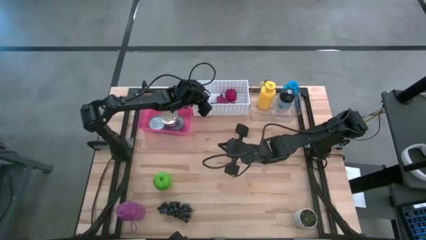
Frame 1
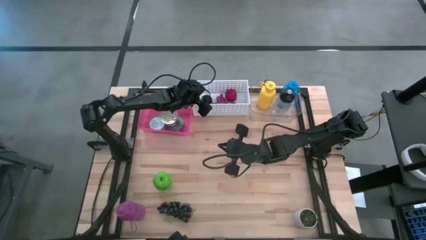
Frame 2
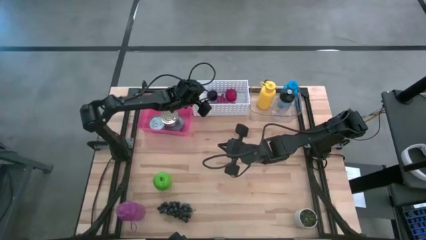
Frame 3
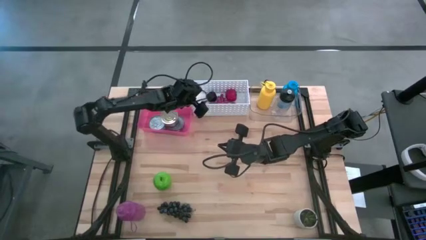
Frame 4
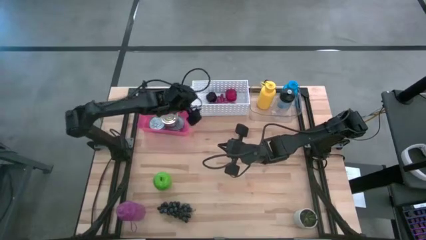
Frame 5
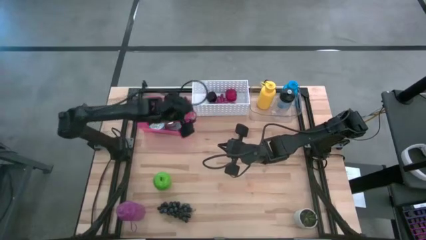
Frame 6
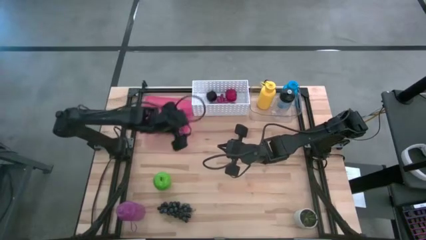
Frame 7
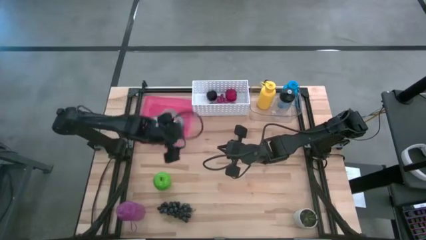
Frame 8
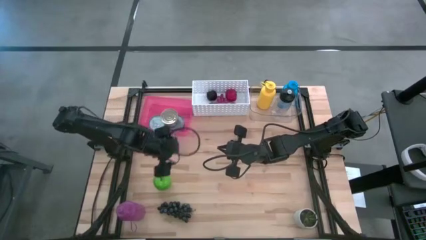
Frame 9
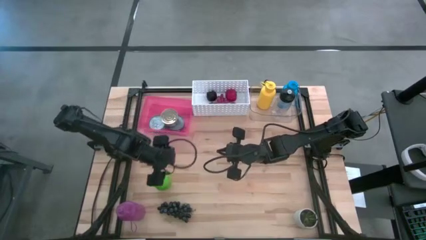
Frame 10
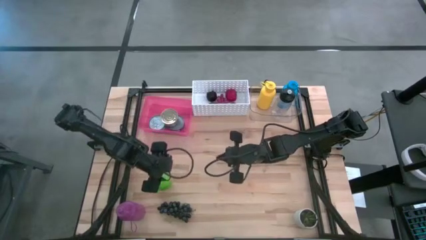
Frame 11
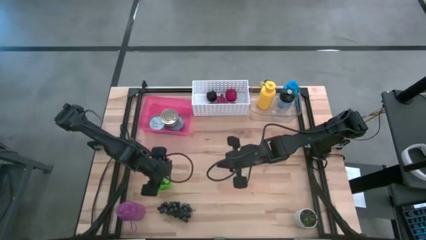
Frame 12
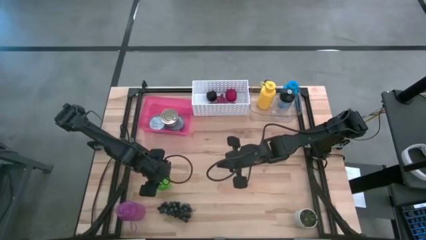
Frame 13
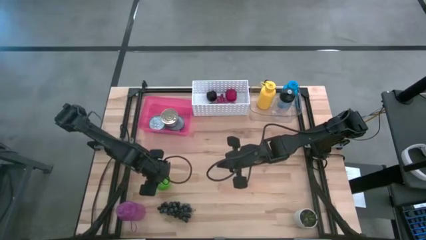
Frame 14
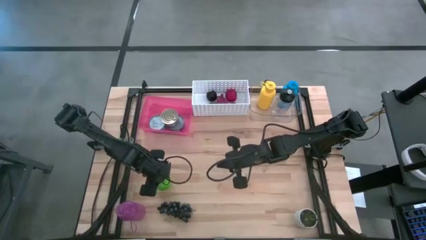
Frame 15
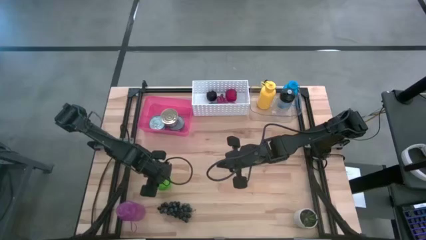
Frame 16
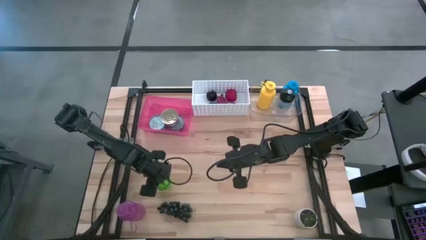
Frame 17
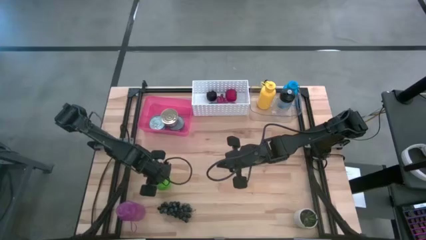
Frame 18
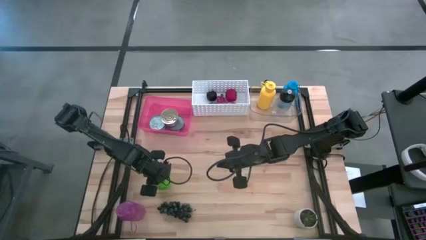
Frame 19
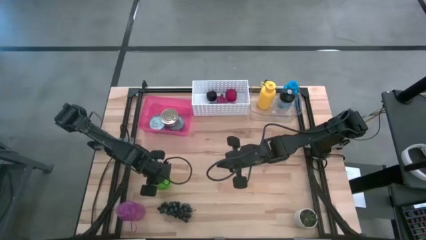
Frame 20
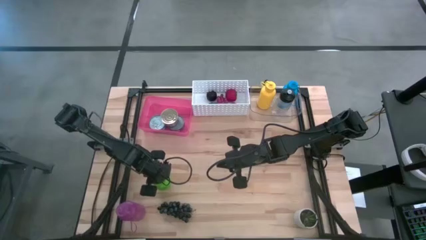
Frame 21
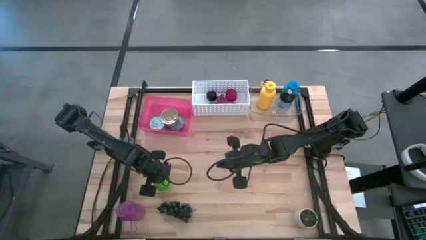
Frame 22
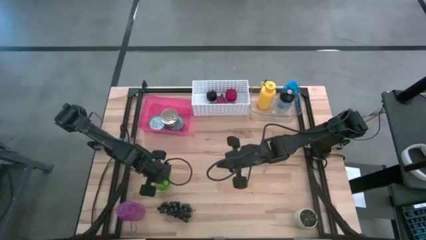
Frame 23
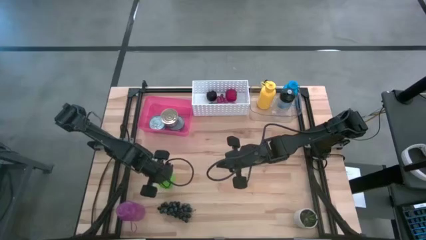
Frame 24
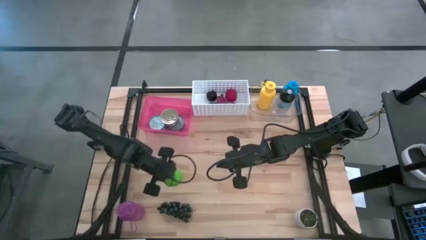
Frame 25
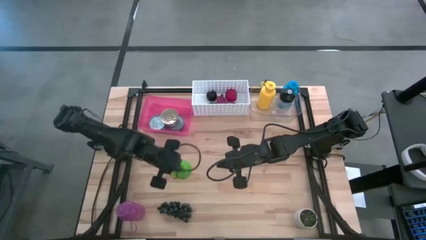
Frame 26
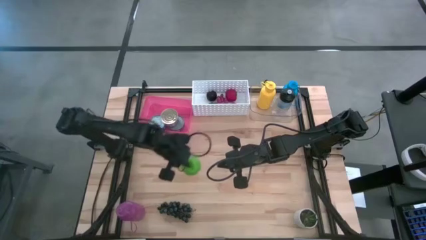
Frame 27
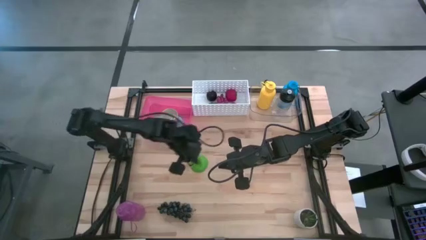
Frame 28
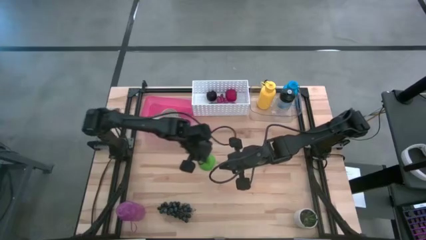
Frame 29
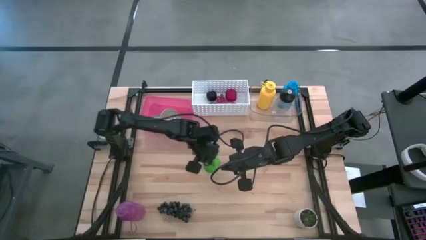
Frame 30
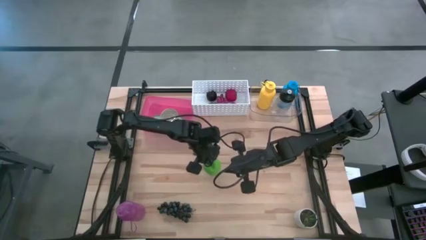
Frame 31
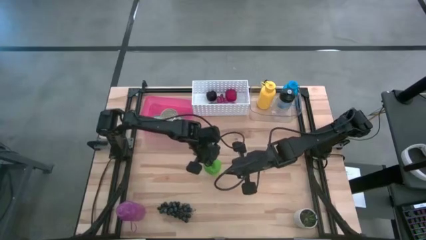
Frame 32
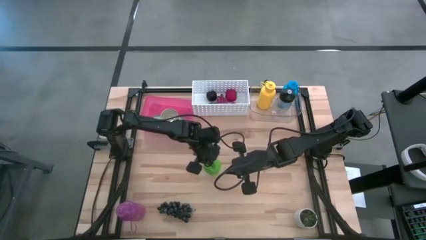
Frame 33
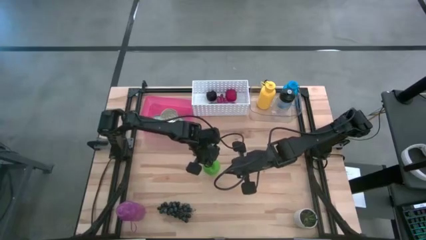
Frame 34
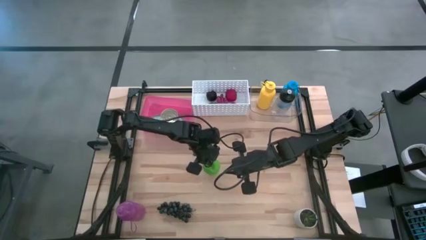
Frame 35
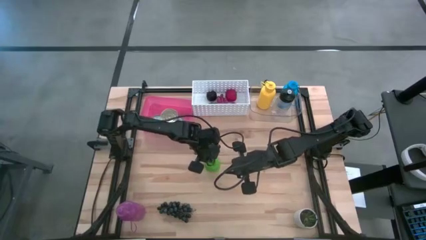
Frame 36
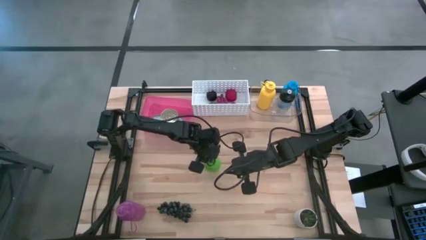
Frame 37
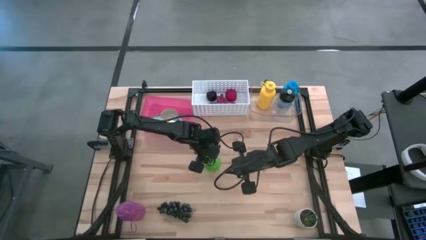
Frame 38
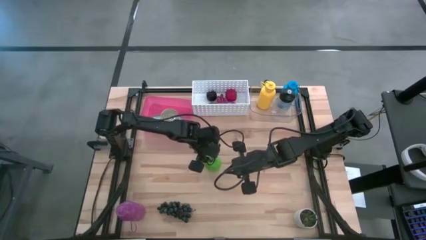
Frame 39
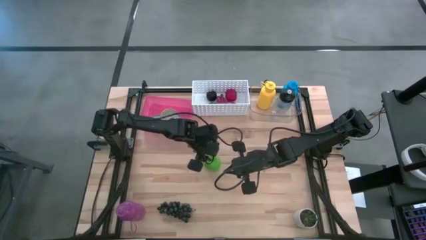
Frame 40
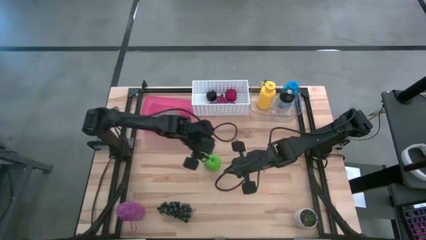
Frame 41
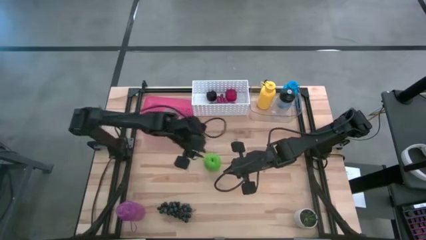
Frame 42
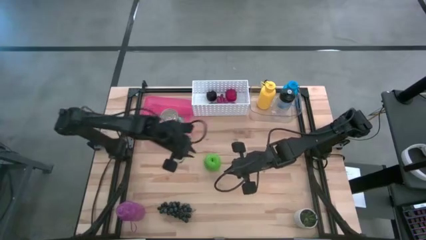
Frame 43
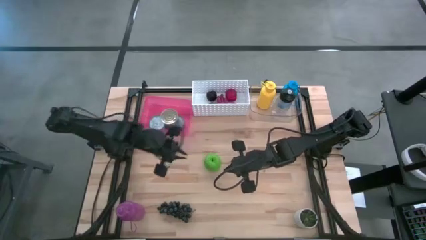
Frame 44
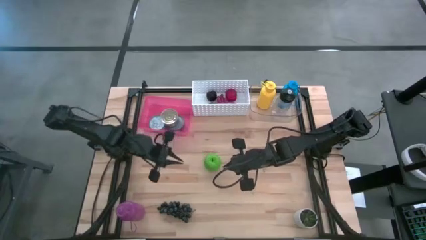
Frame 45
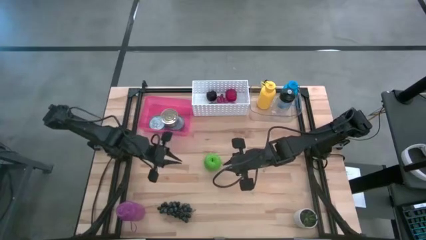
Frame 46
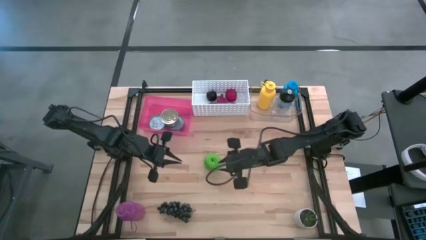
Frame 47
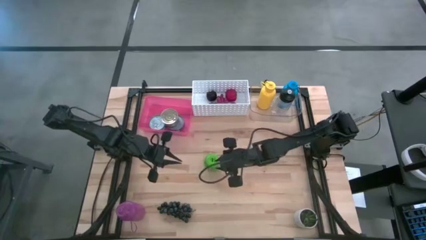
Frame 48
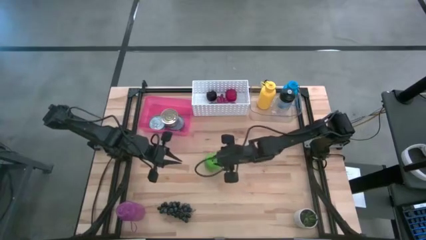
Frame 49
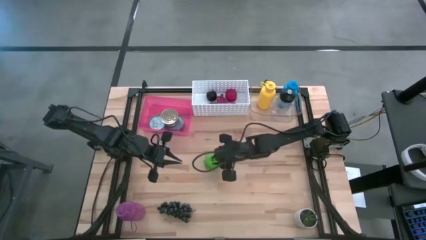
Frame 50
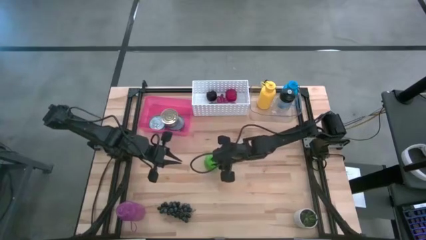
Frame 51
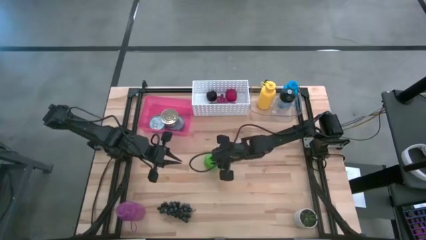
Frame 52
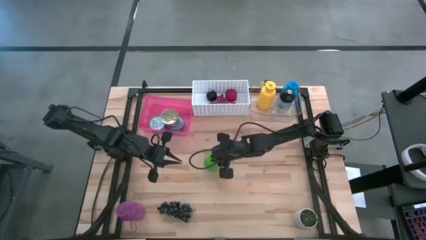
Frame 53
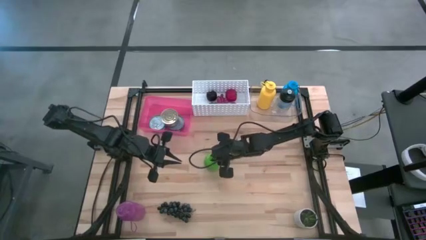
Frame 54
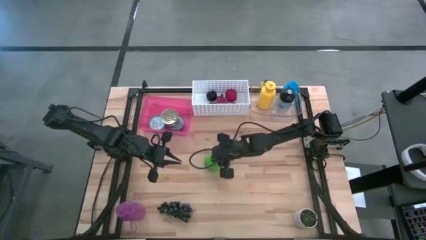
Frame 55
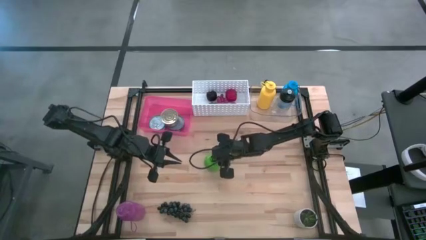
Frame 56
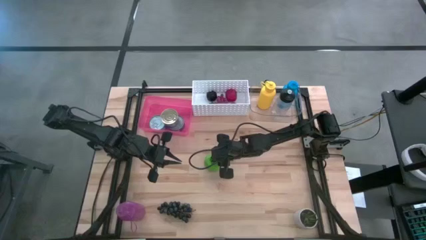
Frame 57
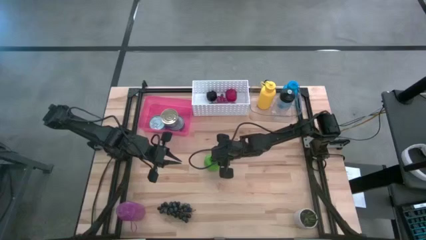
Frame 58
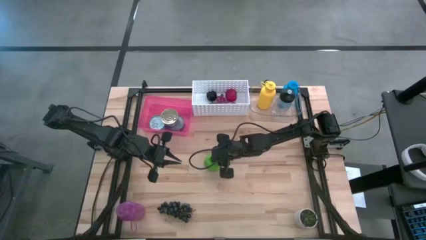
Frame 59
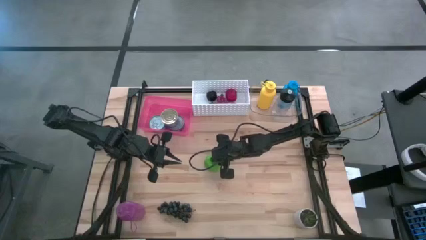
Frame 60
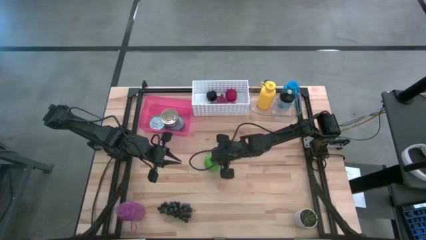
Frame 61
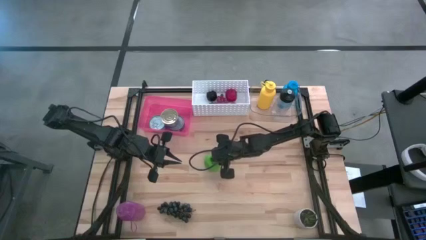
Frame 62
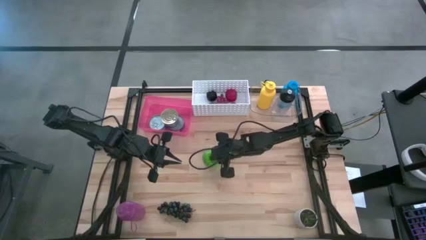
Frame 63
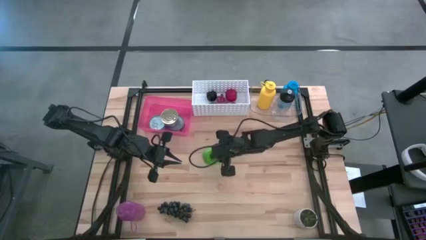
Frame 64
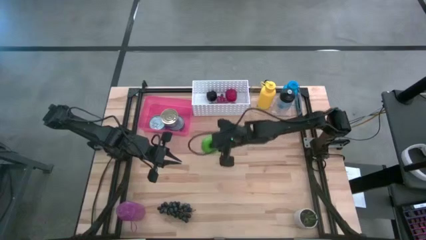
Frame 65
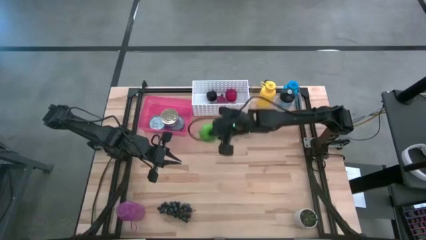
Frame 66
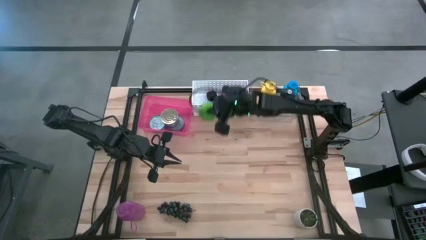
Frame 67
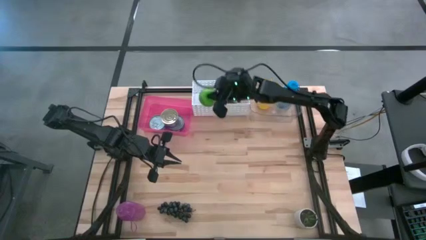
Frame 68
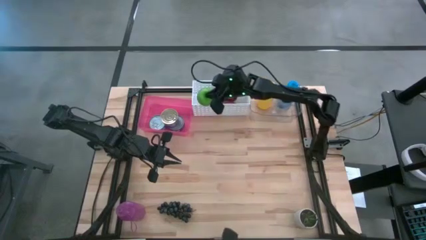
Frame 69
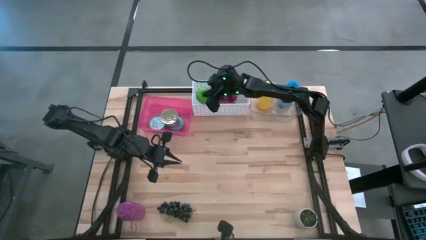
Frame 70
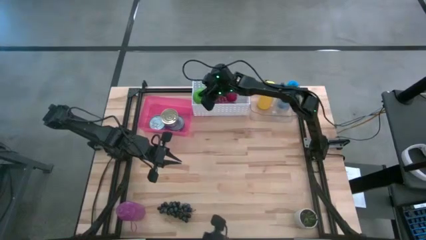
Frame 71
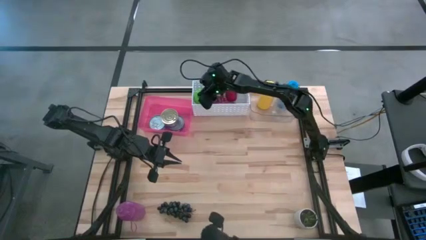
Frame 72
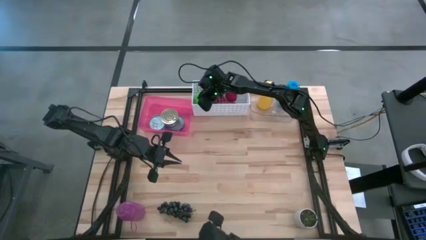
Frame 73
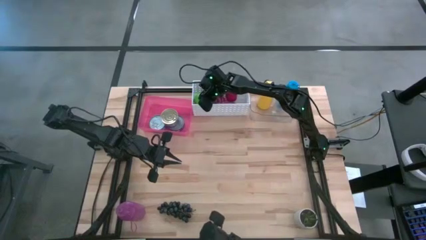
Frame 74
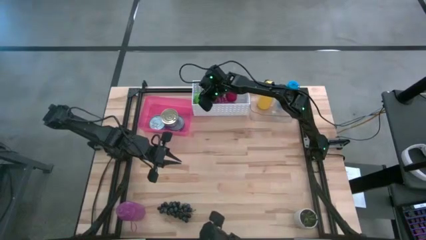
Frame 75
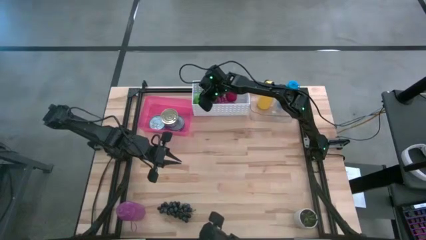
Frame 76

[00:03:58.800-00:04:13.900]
Task: Pick & Place Food Item
Put the green apple into the white bin
